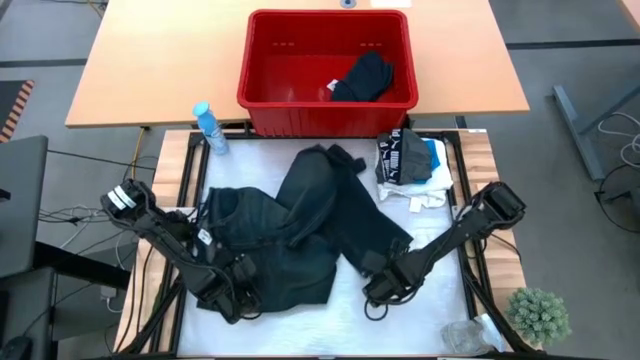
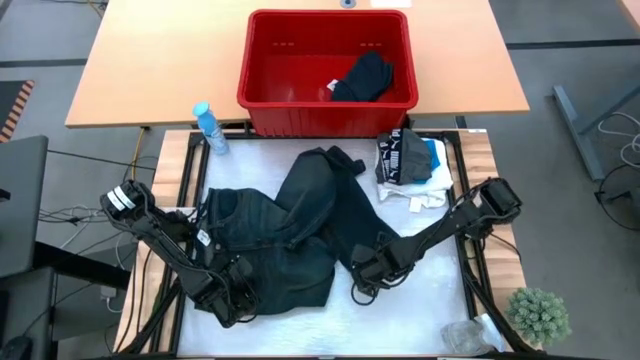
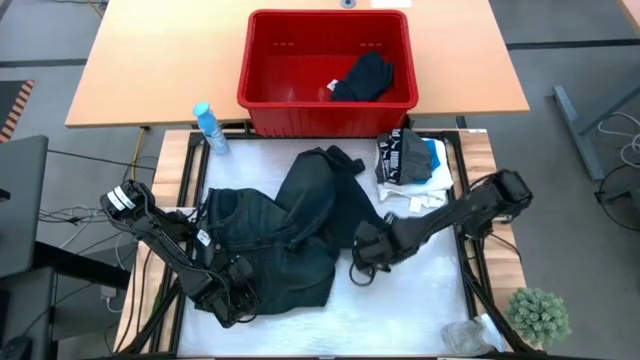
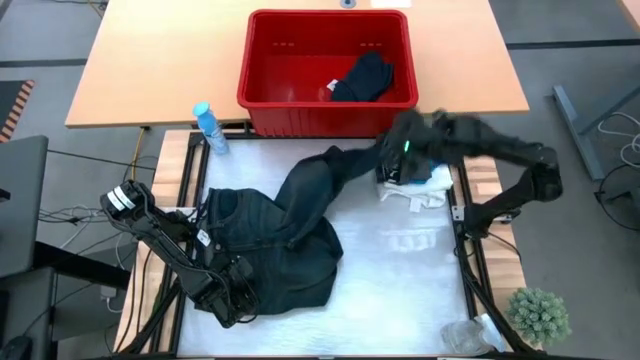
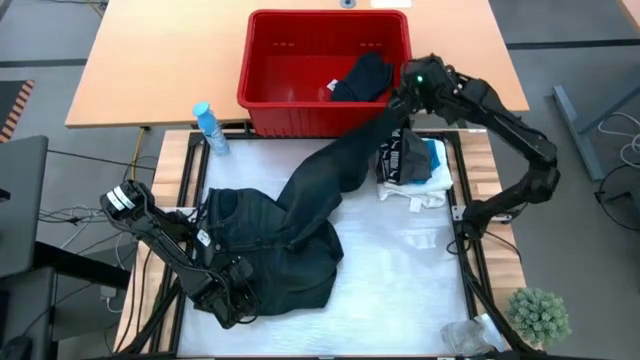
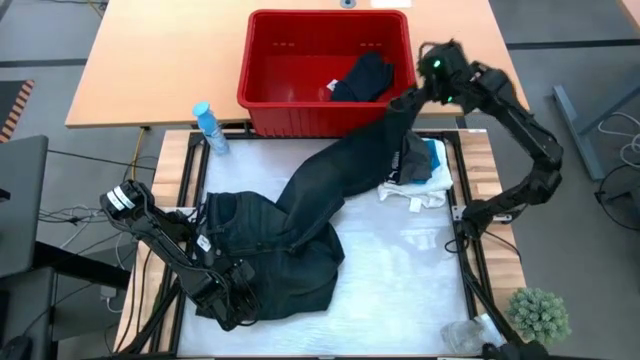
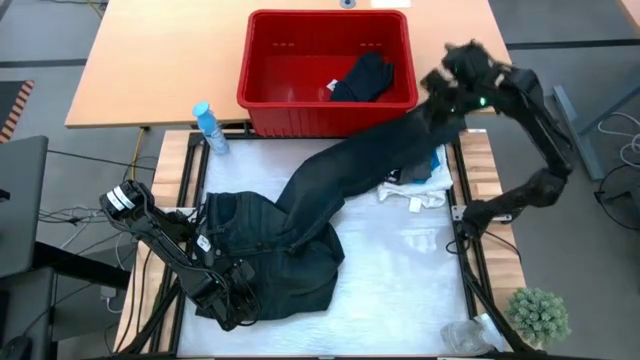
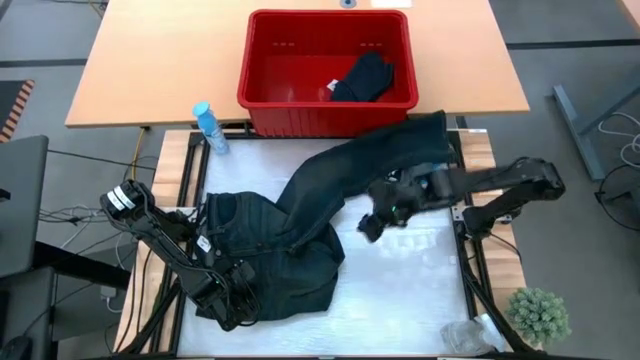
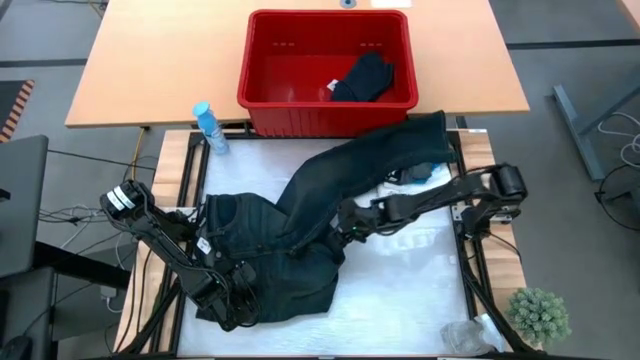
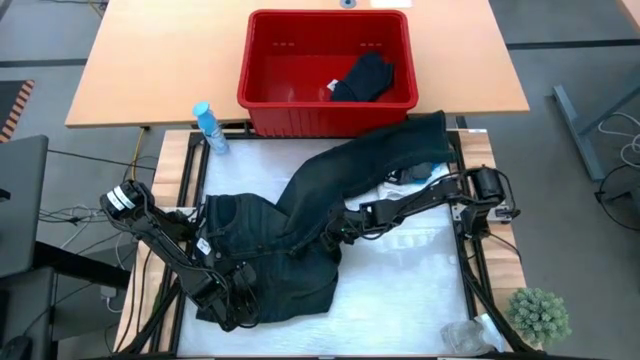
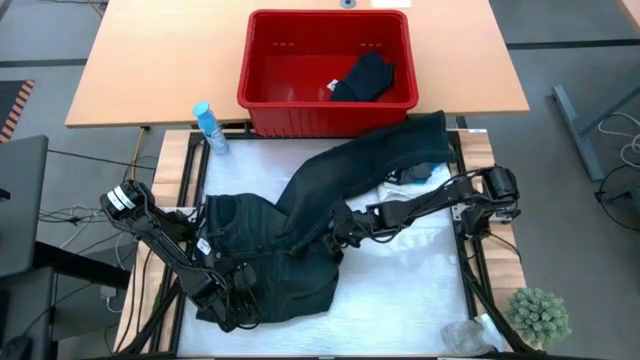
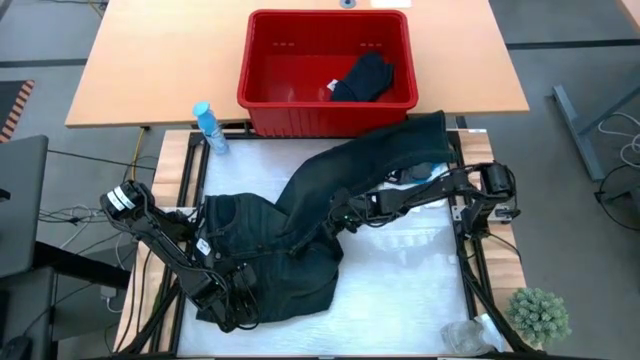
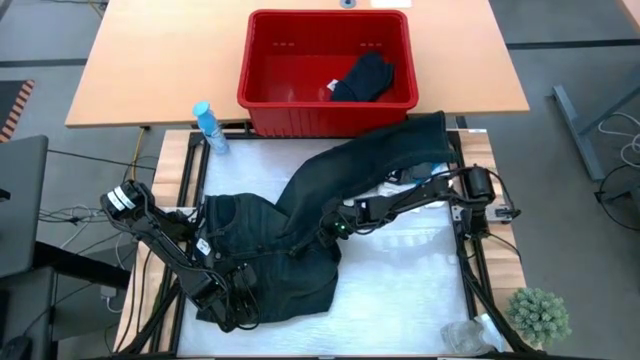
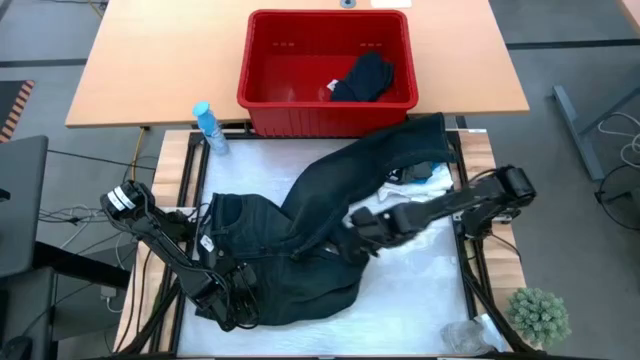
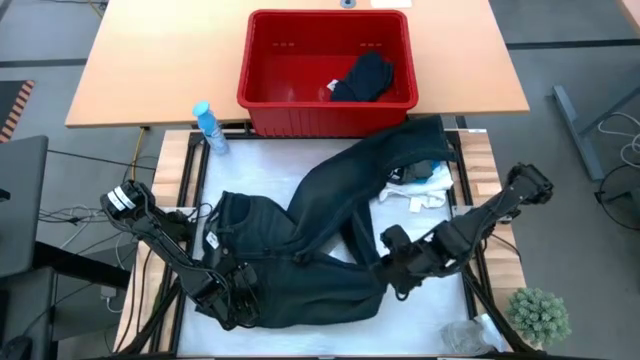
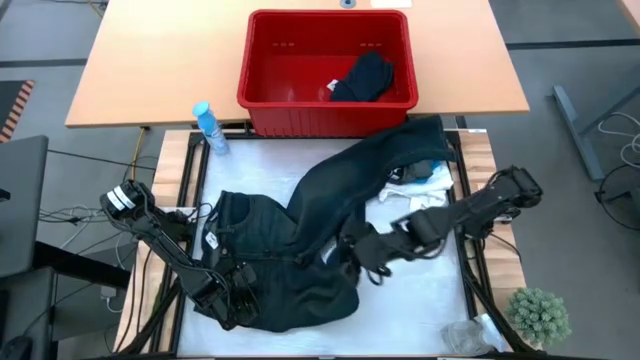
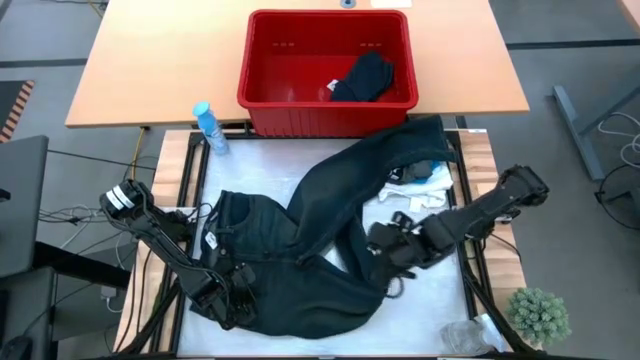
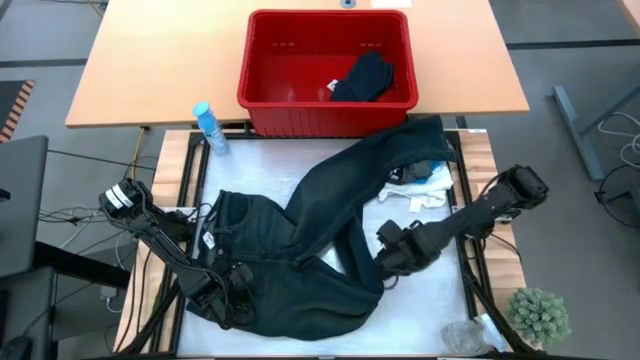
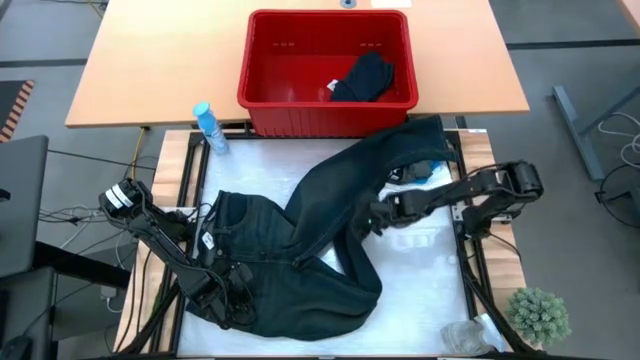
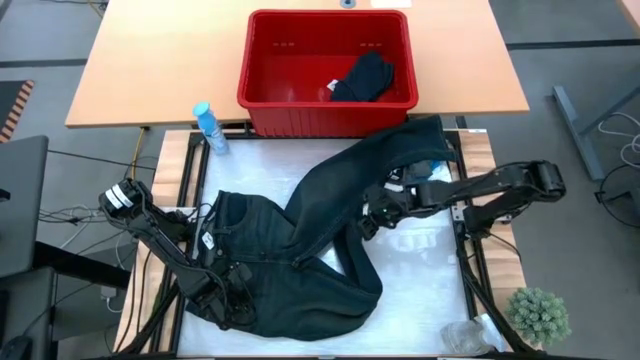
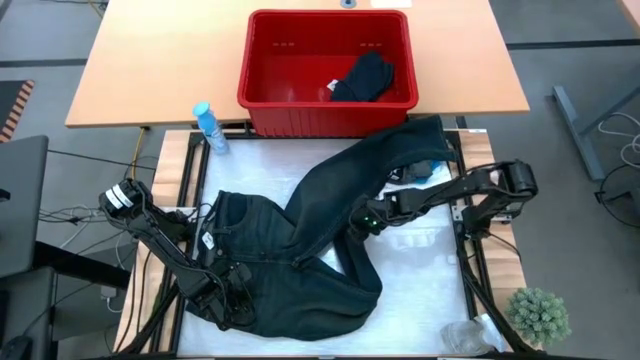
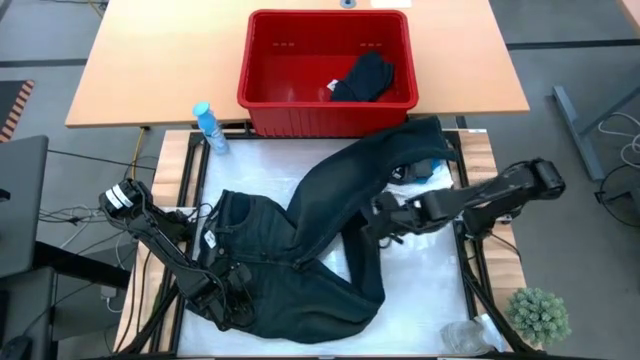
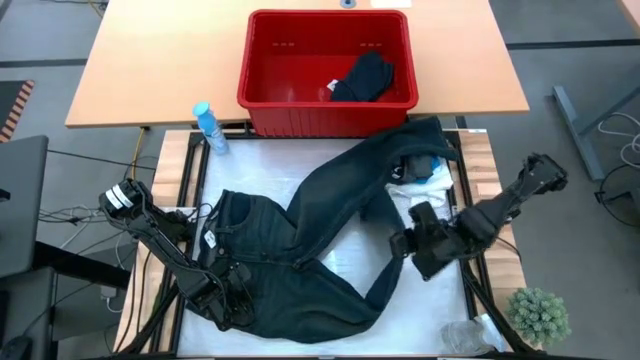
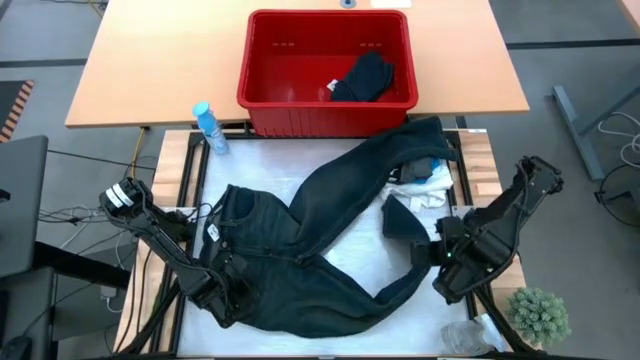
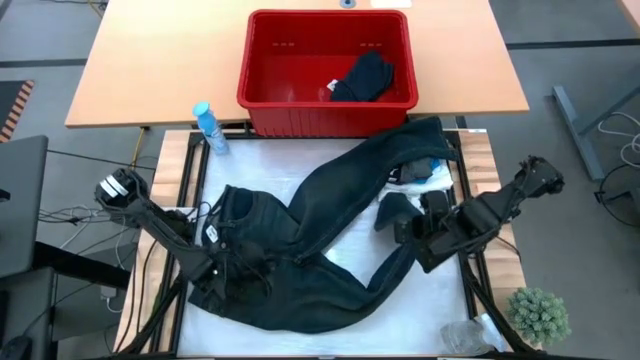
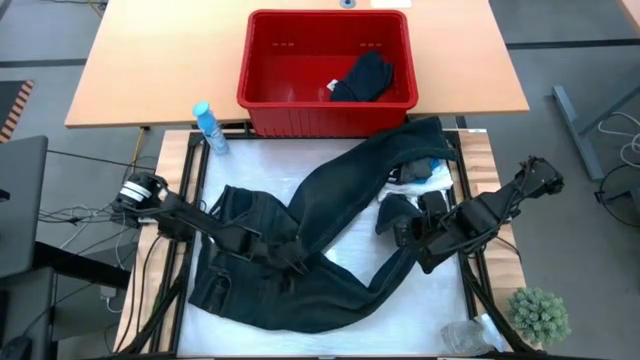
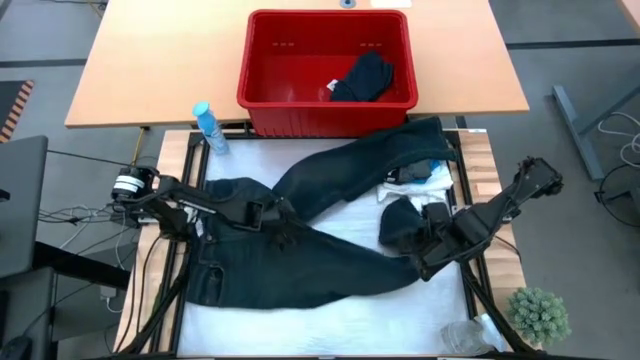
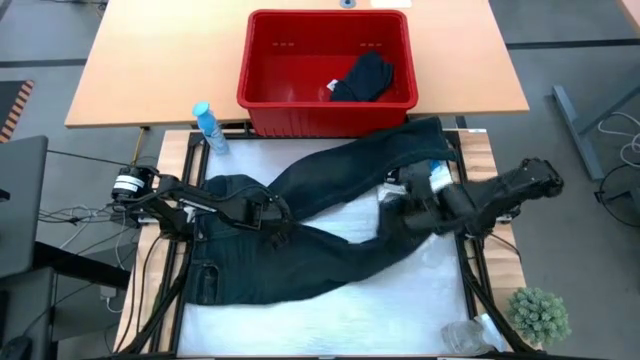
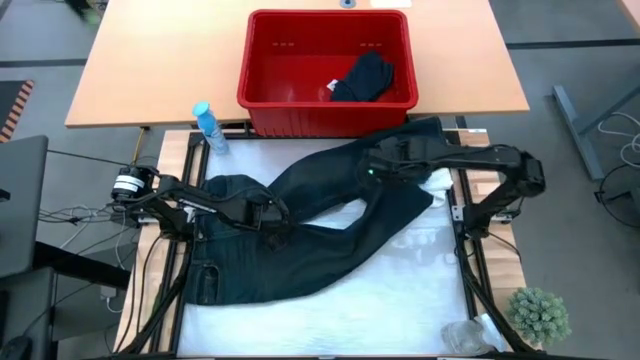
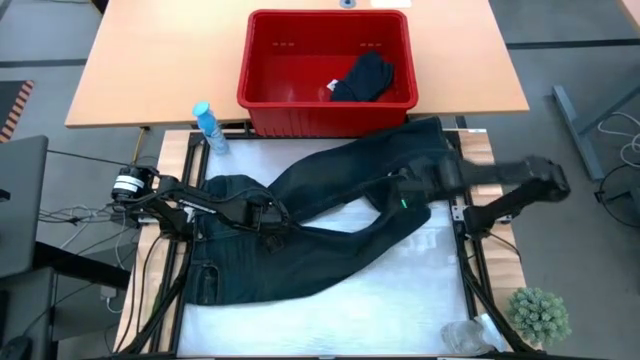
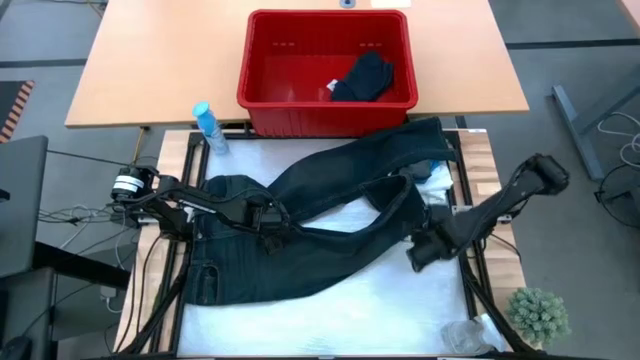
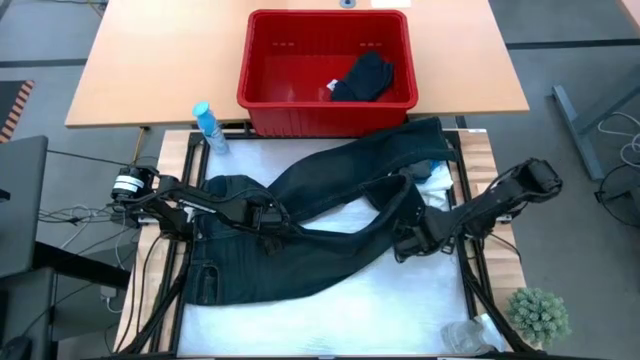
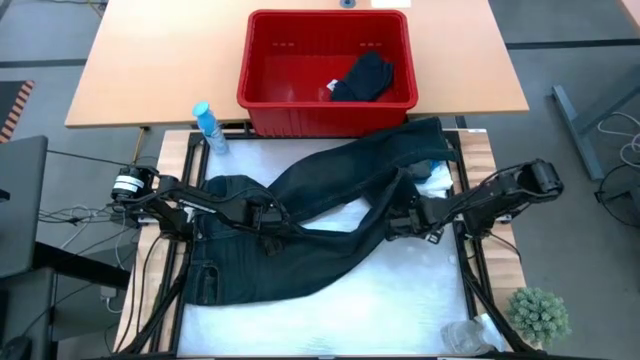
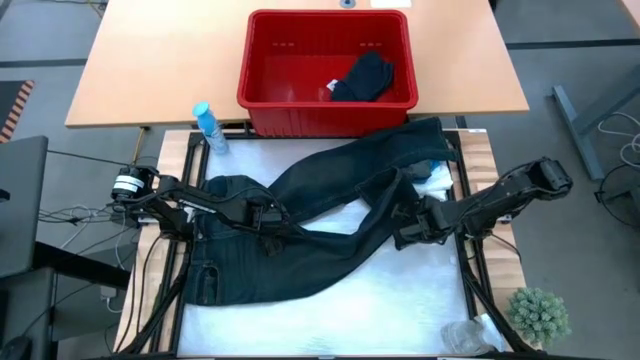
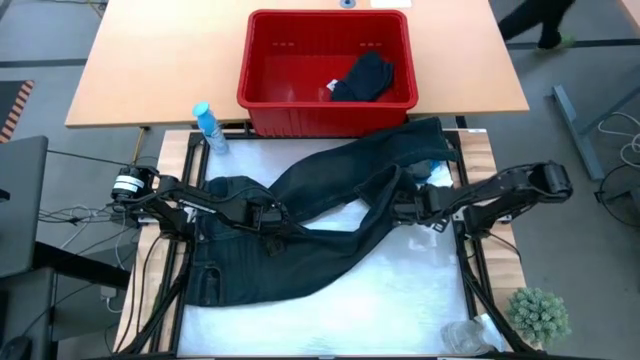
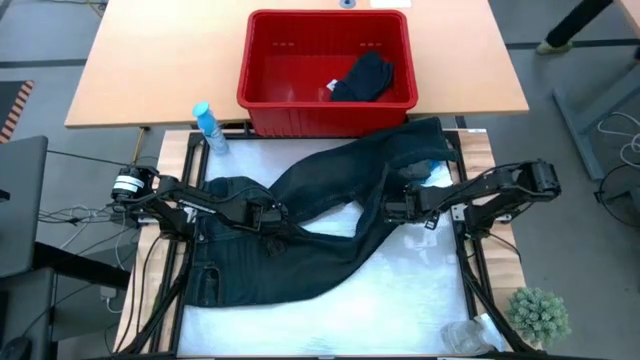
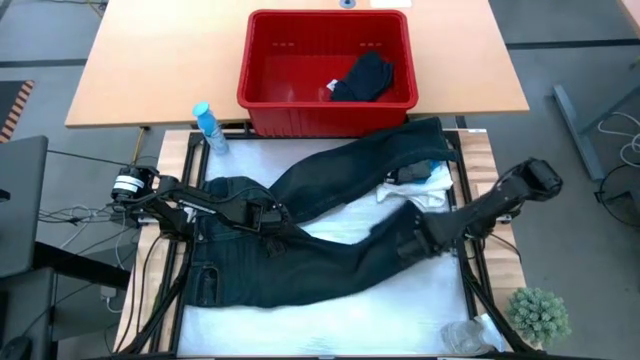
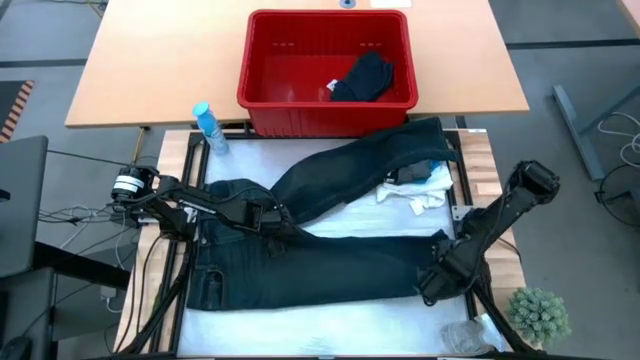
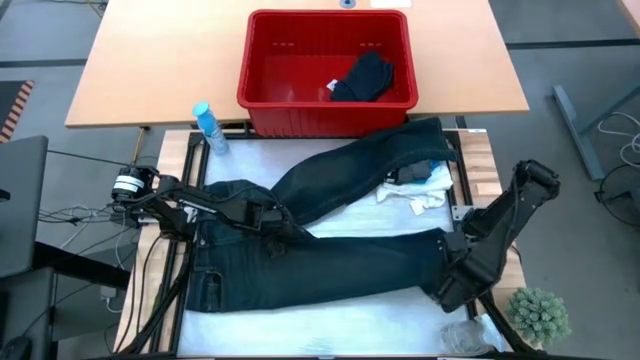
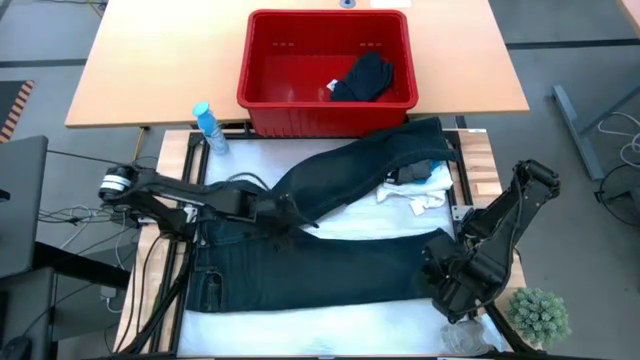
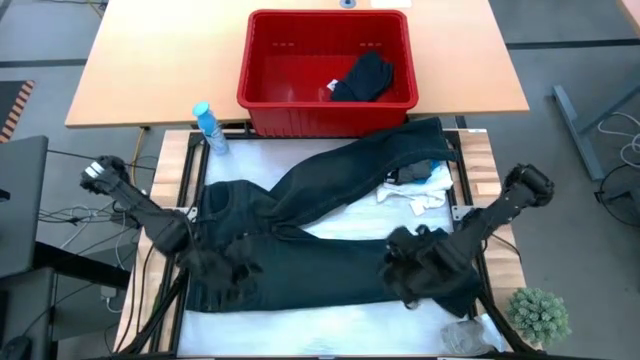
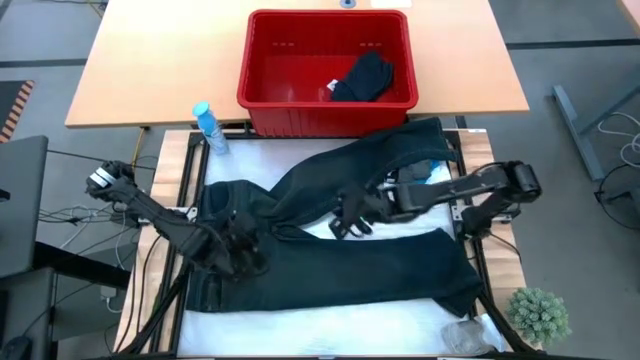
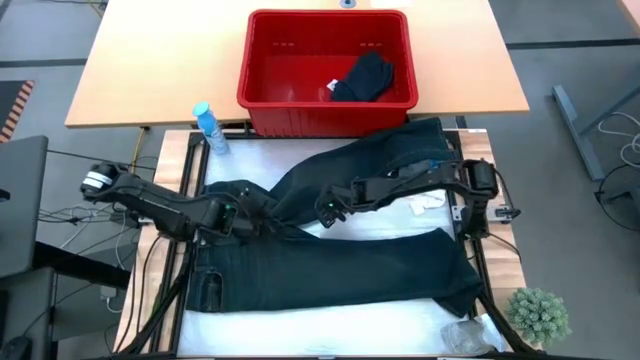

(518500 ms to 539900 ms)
Task: Fold laundry
Fold the blue pants

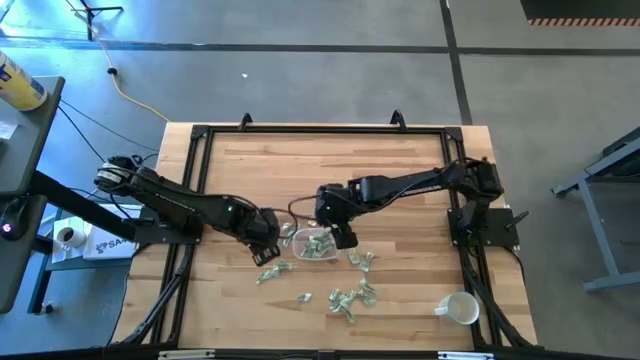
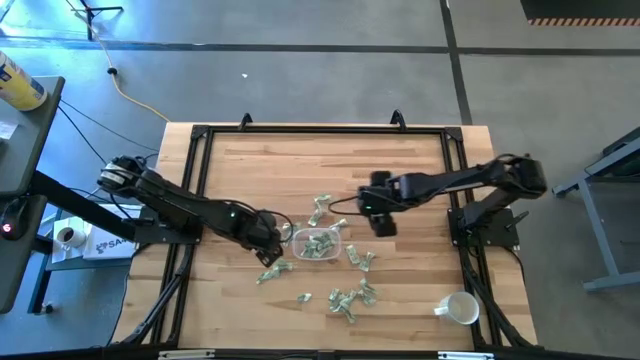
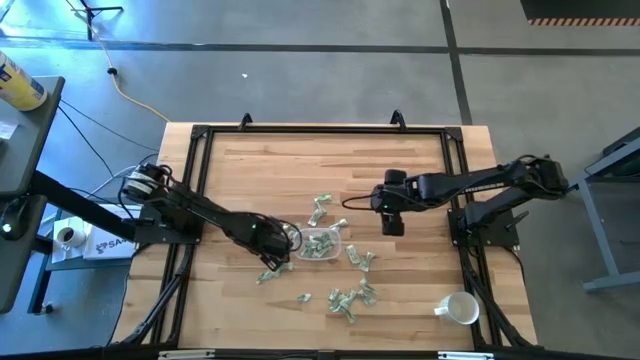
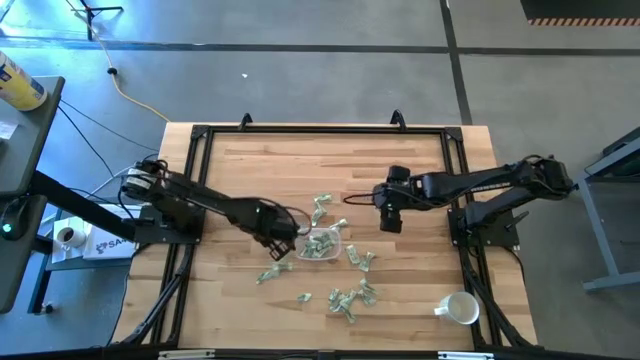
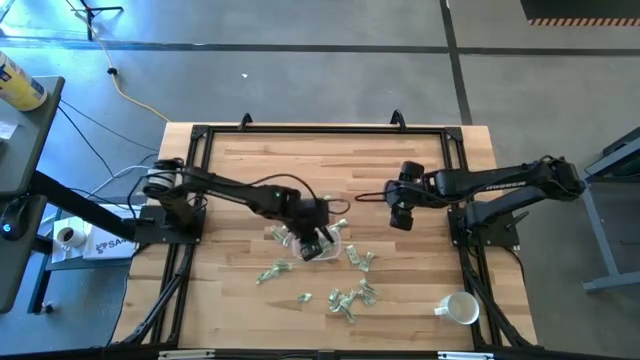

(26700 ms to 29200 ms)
Task: Pick and place Stevia / Truvia into bins
Put the green stevia packet into the transparent bin
